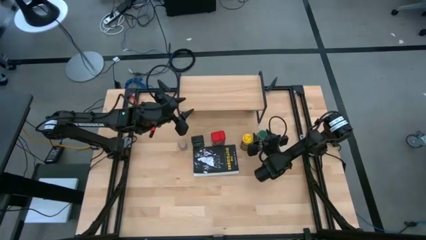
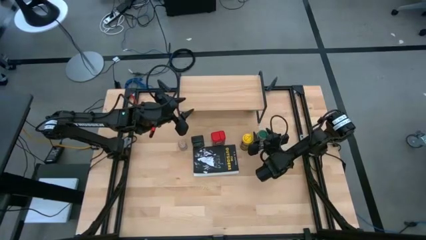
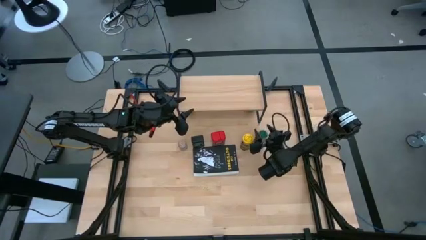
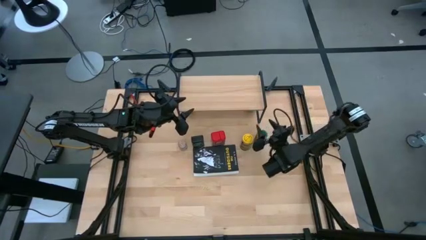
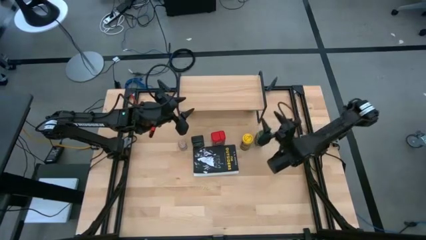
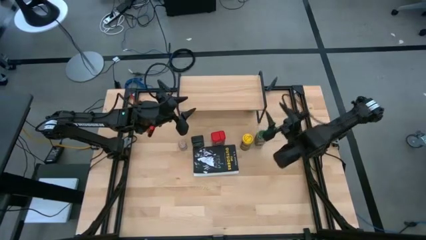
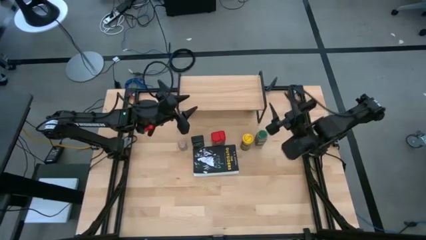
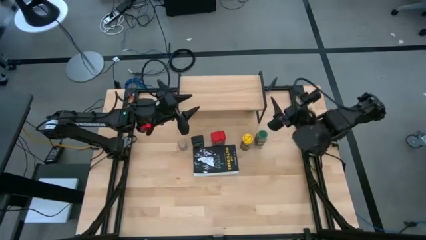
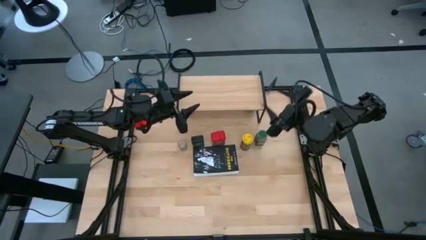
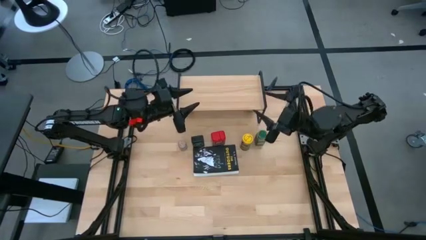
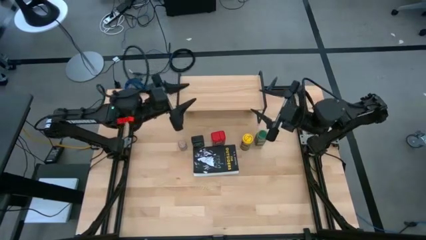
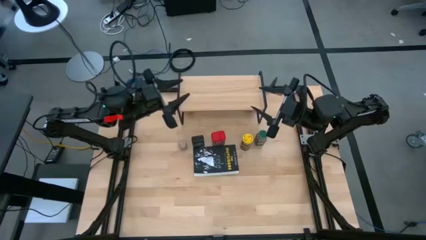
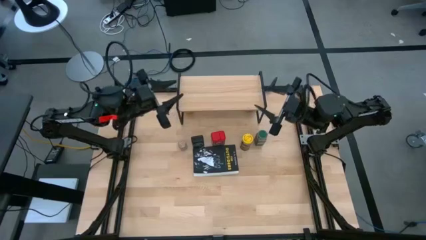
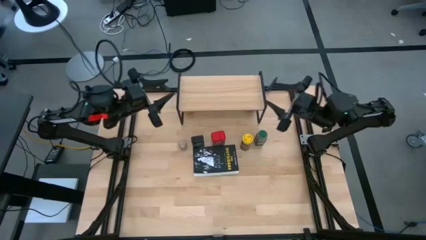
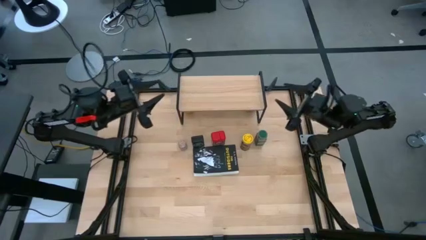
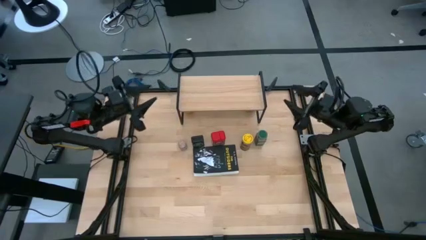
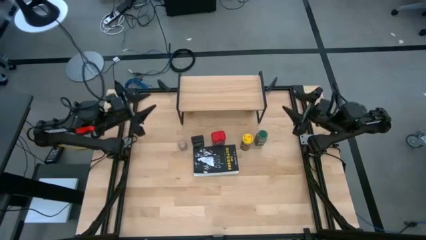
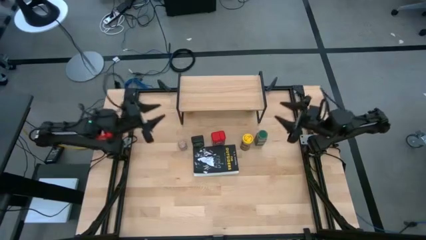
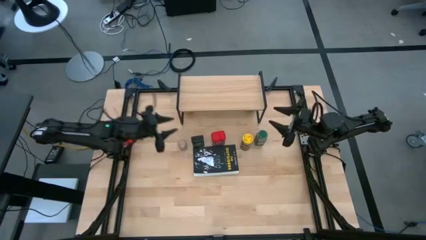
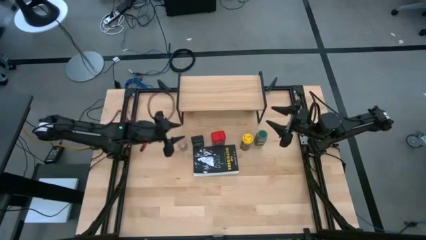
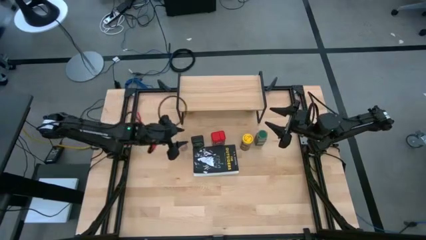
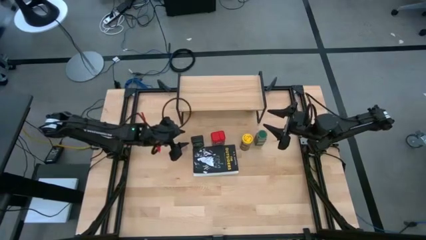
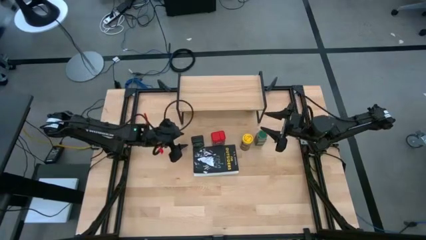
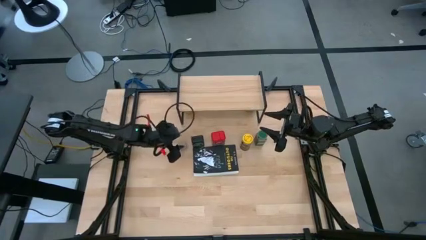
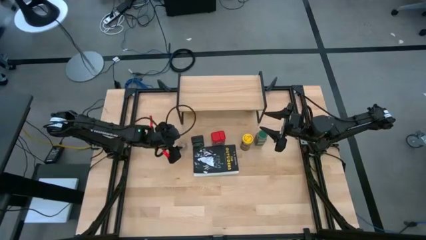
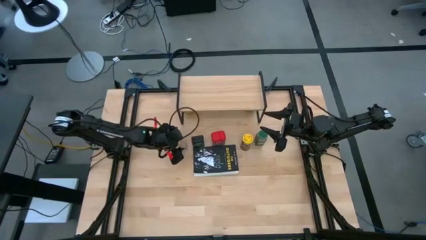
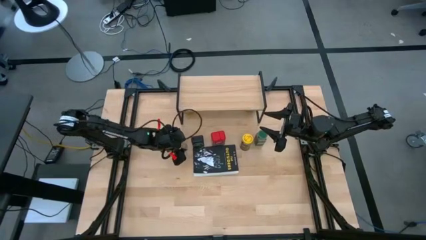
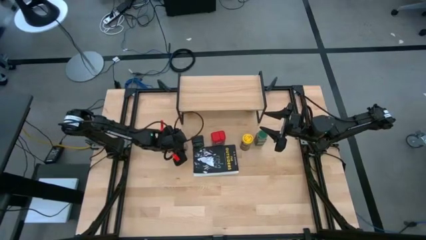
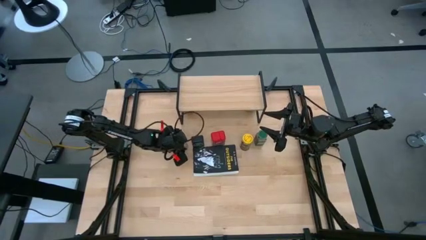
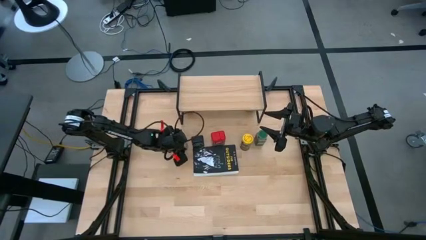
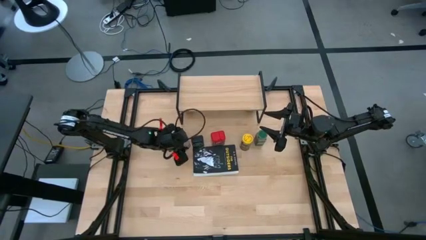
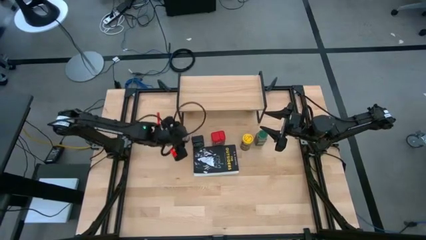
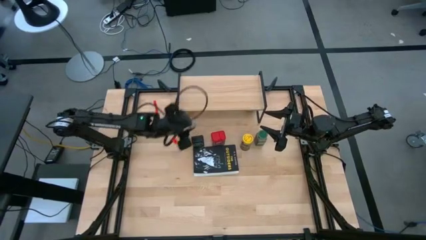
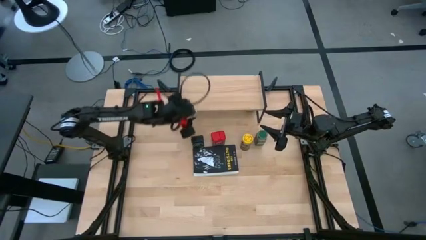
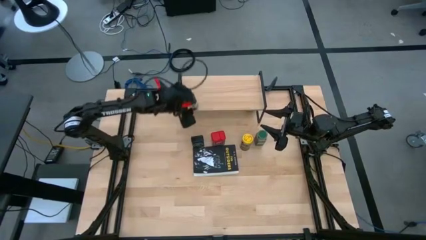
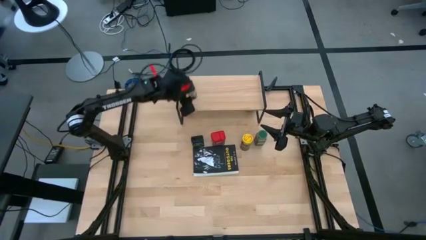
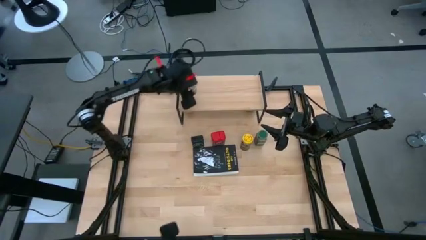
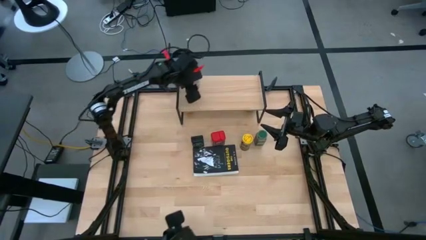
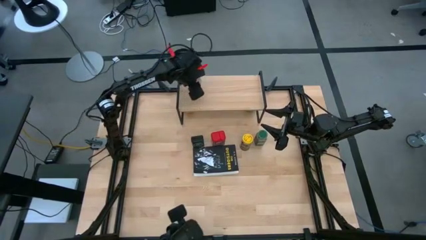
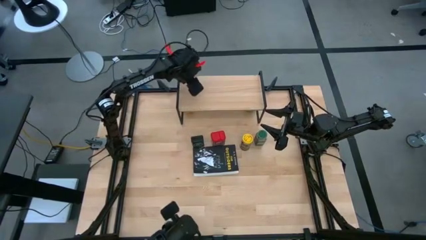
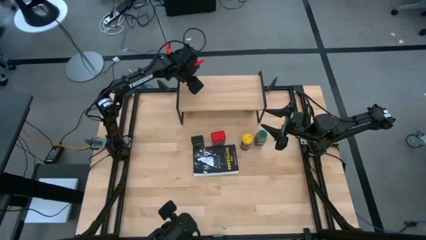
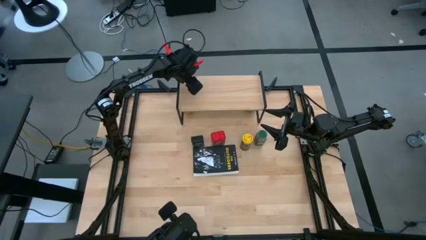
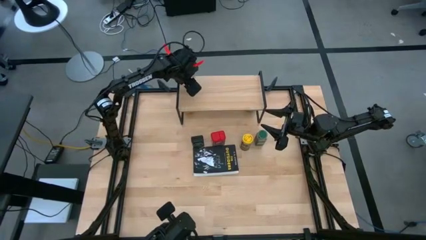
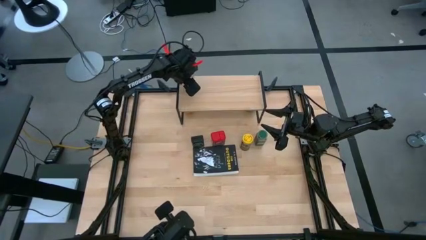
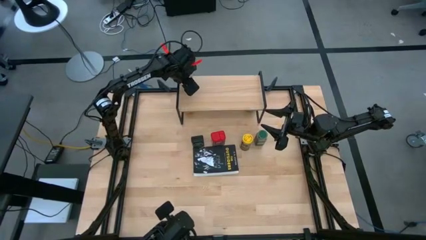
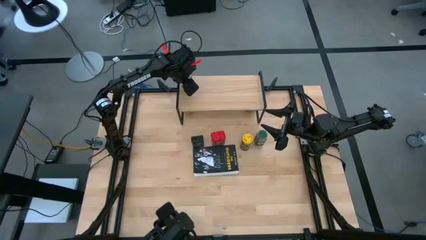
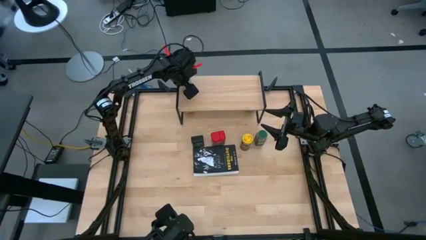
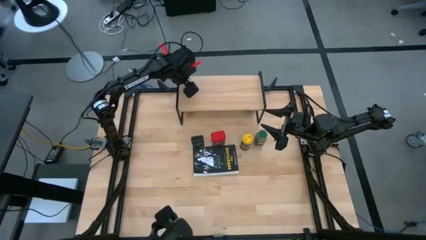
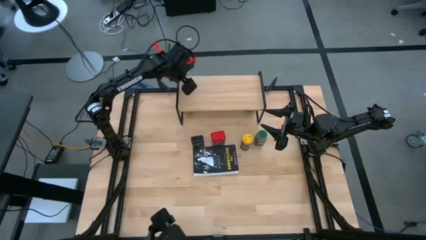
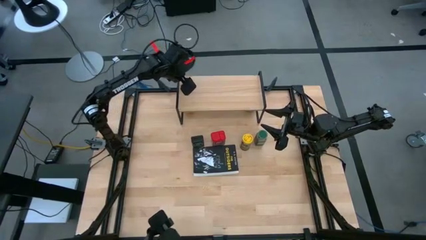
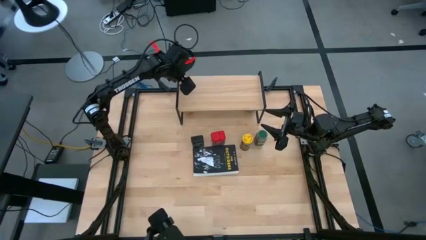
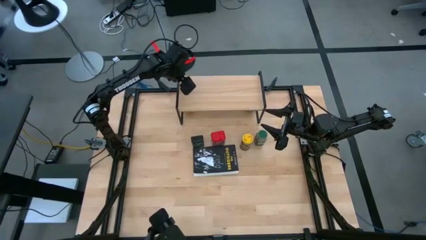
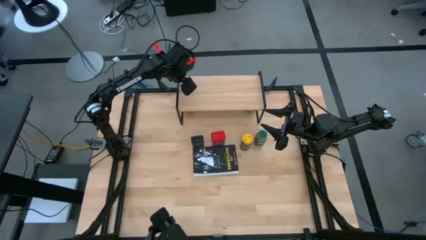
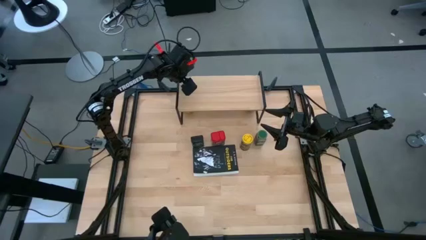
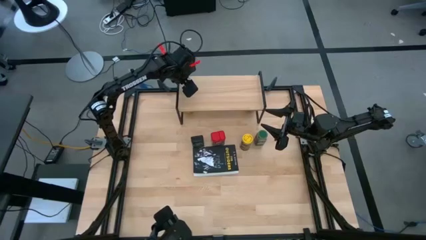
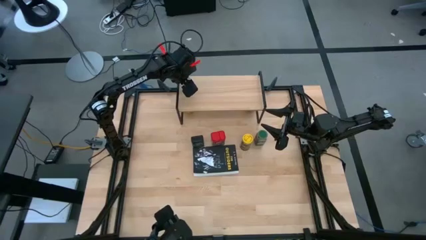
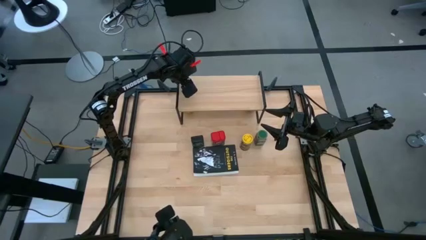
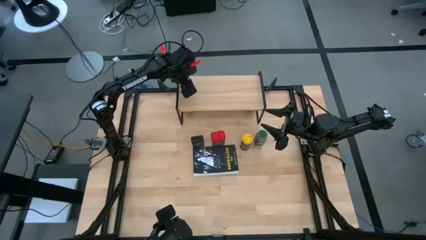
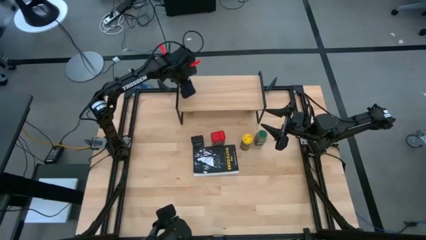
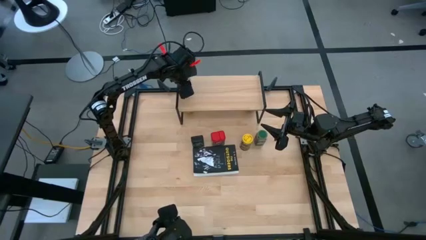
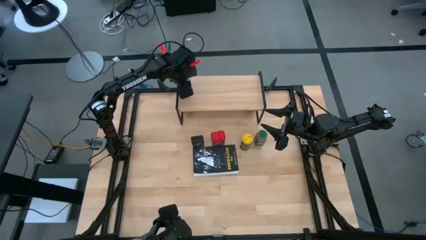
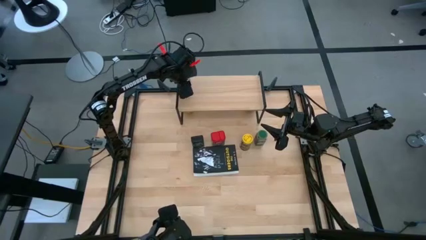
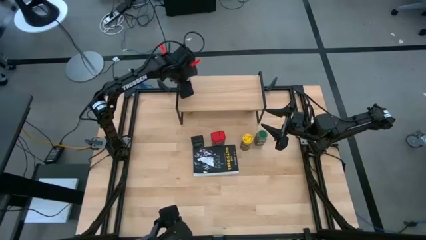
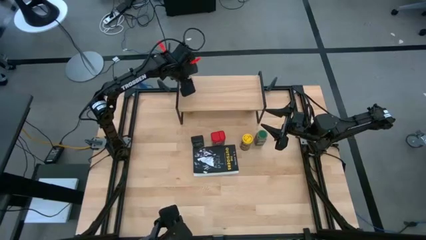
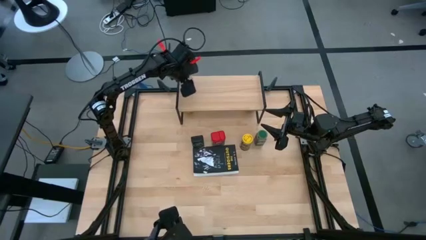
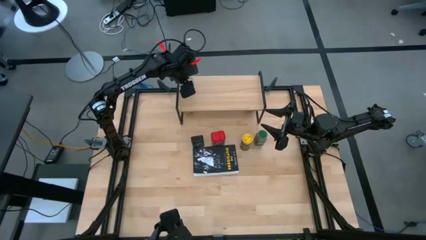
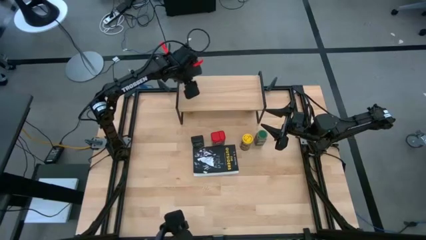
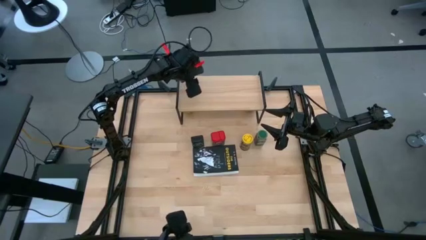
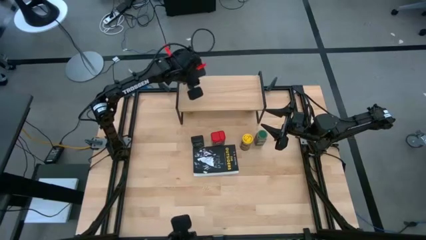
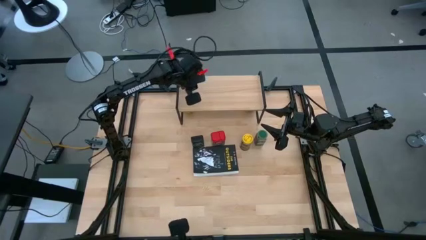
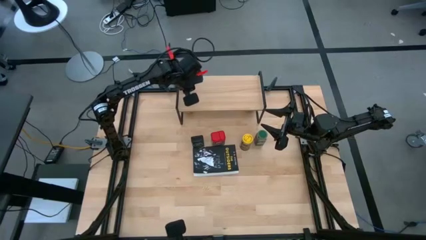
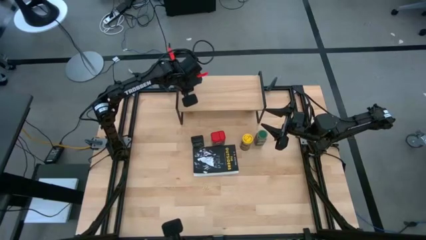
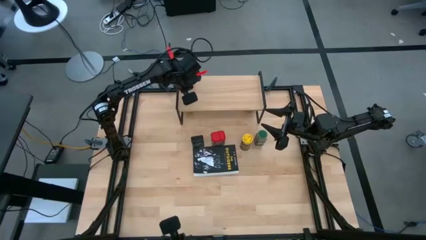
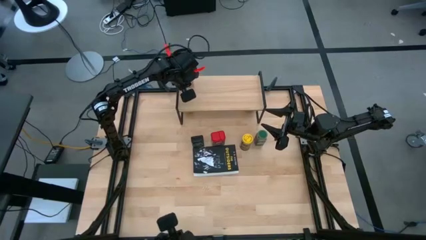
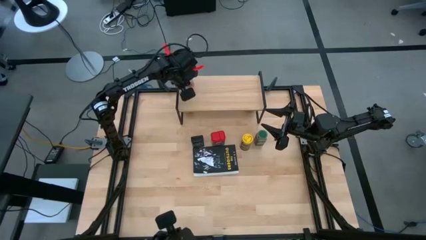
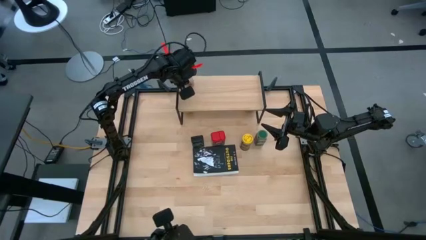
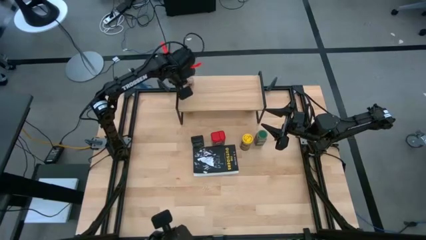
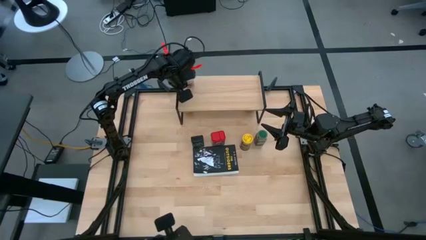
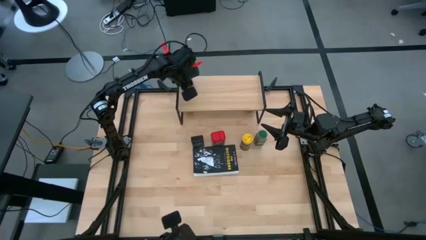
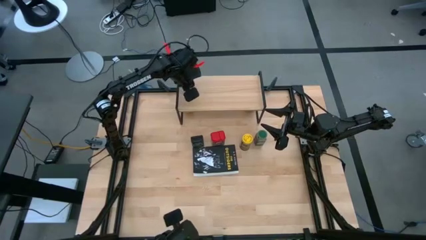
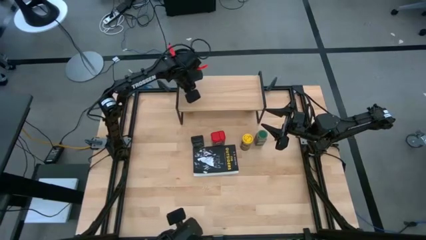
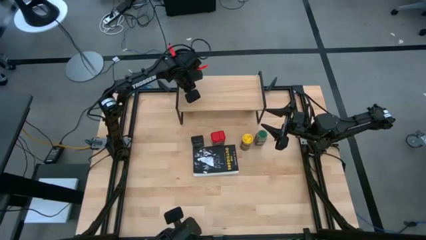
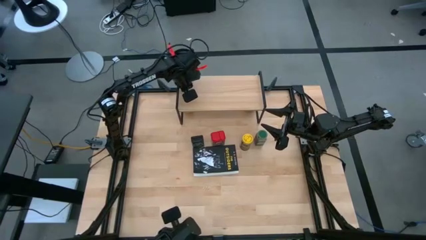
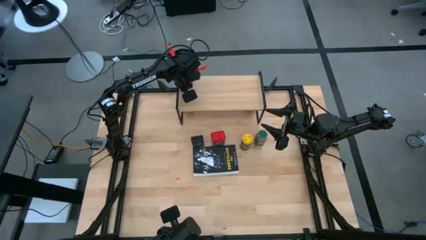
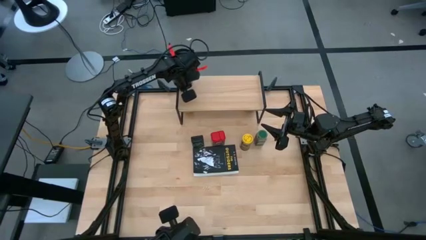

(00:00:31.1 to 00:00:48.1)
Task: Shelf spices
Put the transparent seasoning bottle on the shelf
